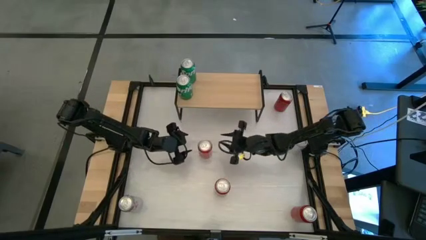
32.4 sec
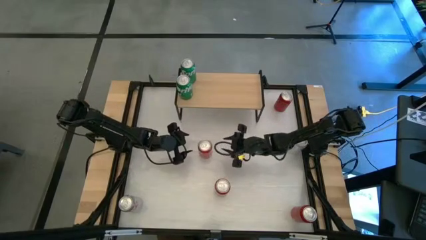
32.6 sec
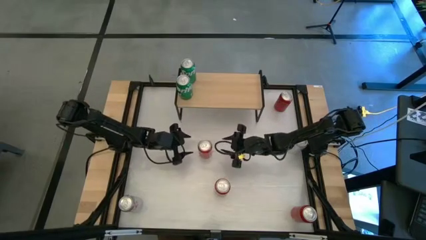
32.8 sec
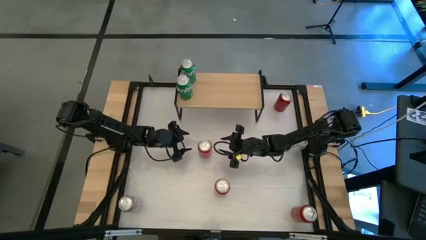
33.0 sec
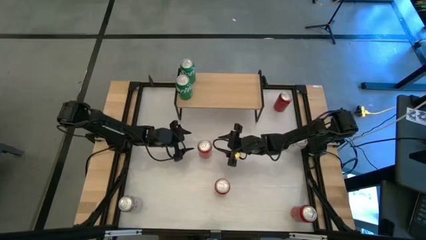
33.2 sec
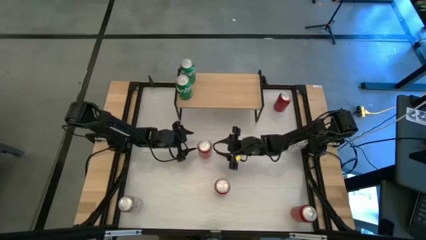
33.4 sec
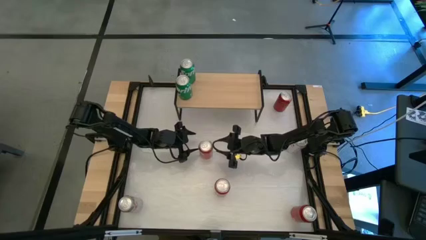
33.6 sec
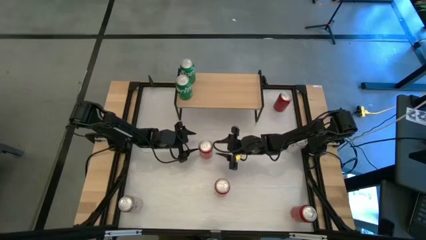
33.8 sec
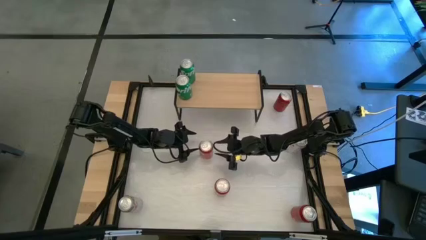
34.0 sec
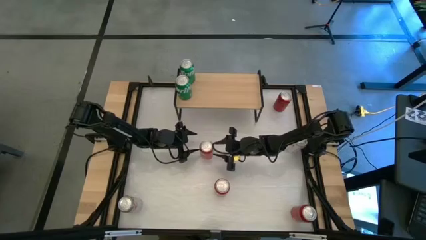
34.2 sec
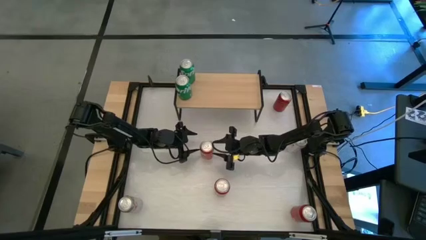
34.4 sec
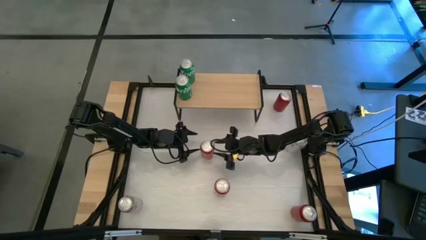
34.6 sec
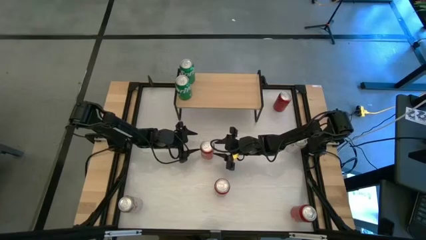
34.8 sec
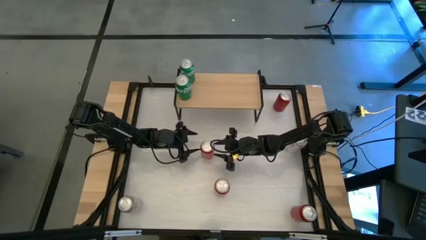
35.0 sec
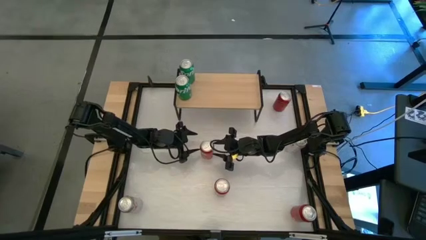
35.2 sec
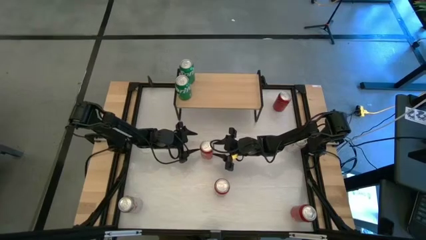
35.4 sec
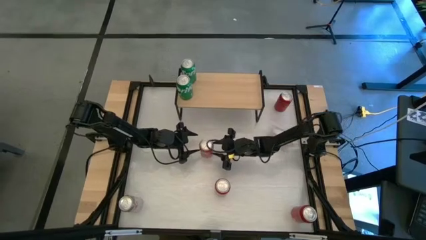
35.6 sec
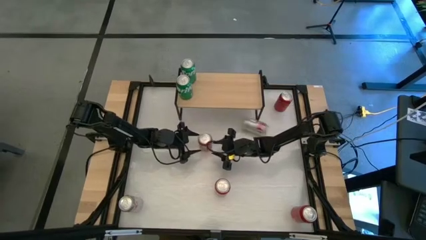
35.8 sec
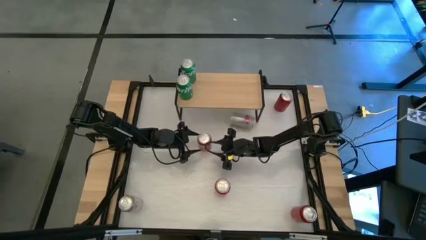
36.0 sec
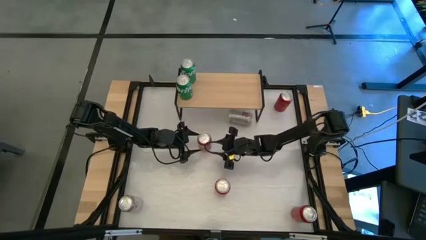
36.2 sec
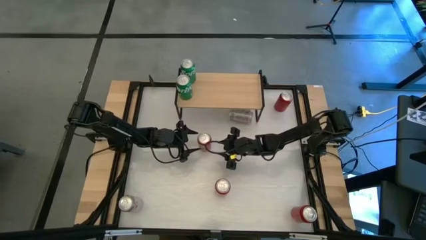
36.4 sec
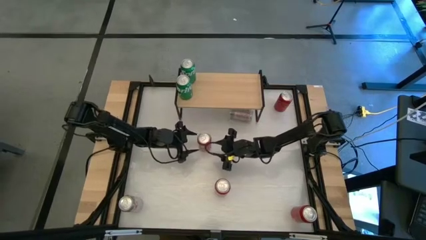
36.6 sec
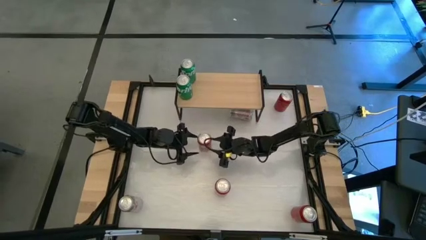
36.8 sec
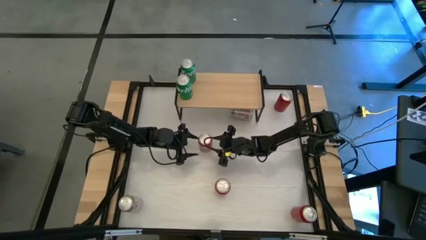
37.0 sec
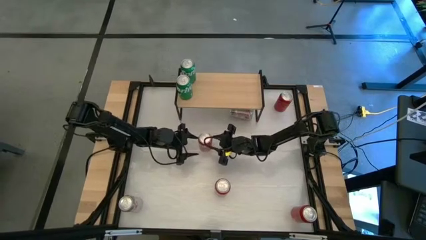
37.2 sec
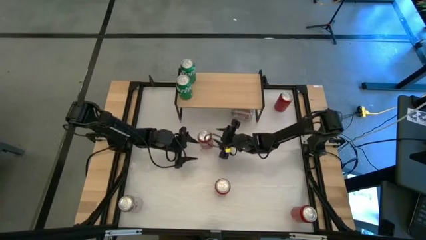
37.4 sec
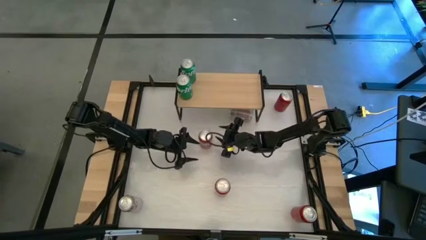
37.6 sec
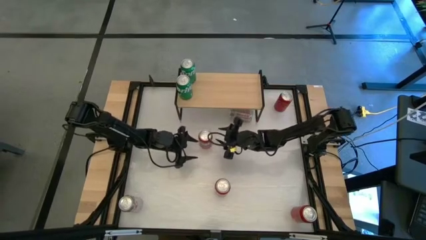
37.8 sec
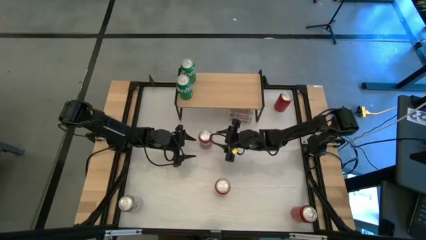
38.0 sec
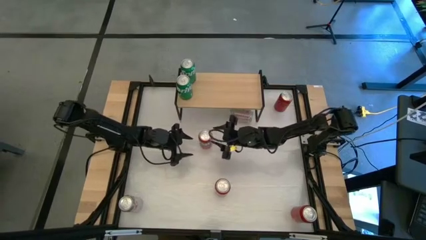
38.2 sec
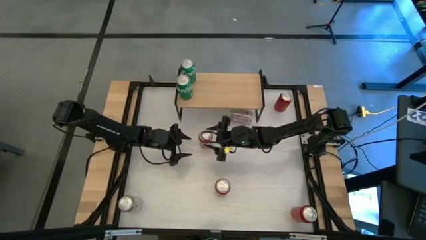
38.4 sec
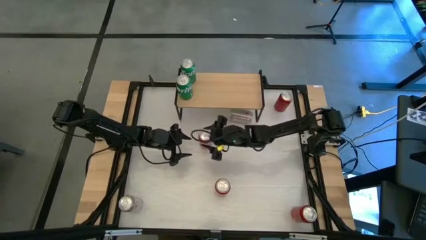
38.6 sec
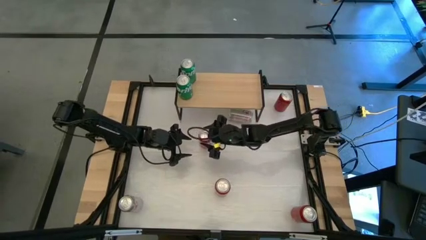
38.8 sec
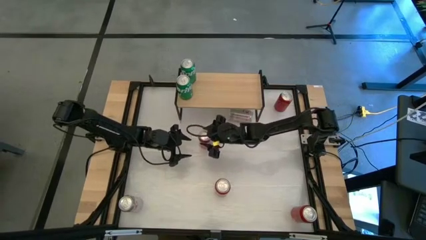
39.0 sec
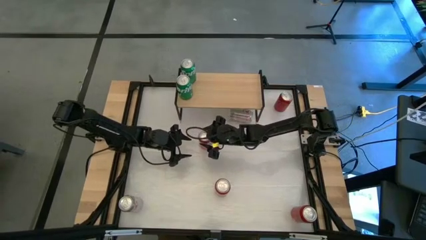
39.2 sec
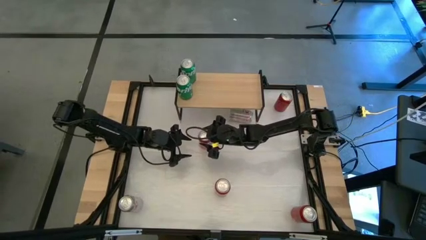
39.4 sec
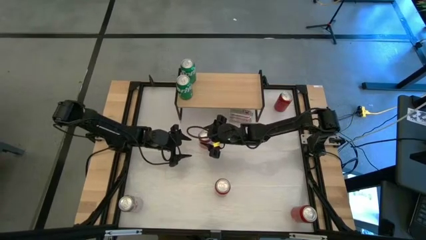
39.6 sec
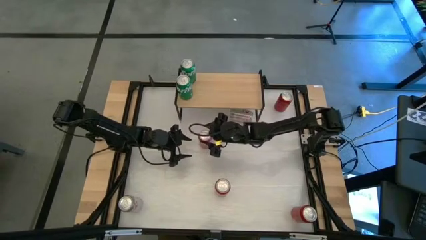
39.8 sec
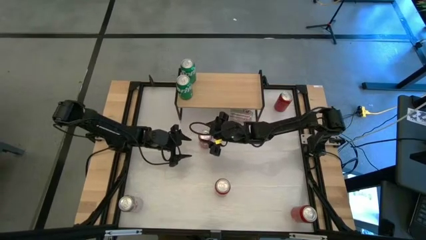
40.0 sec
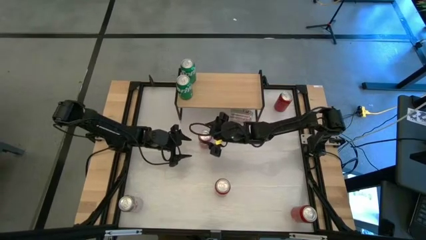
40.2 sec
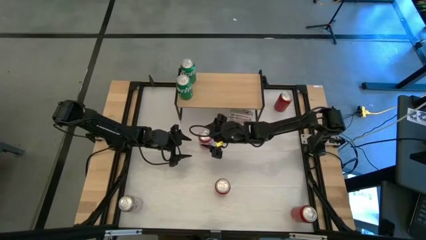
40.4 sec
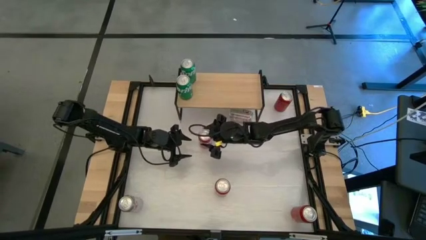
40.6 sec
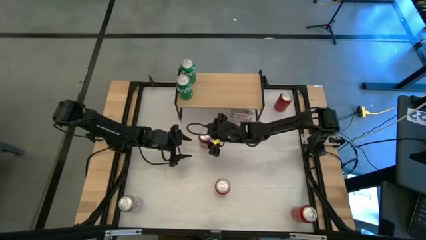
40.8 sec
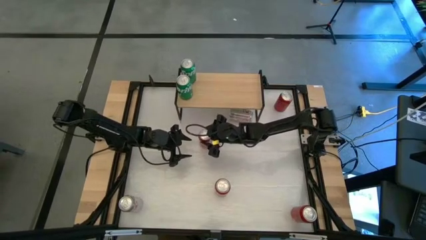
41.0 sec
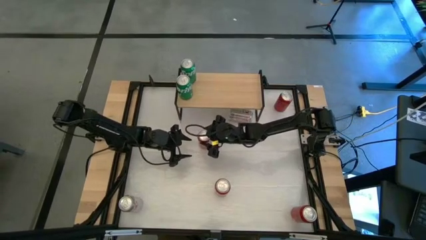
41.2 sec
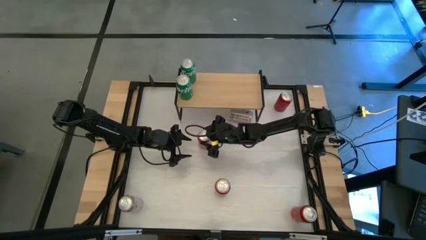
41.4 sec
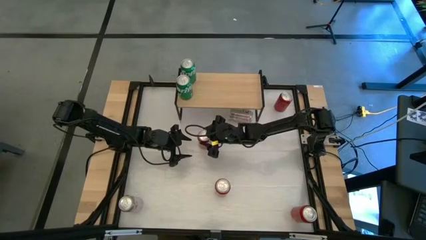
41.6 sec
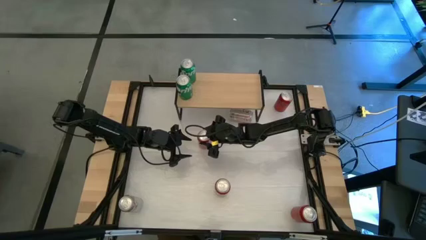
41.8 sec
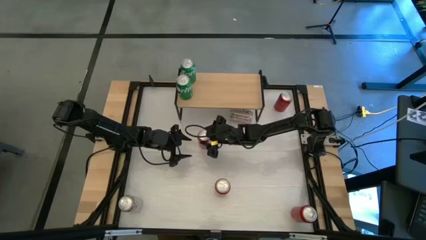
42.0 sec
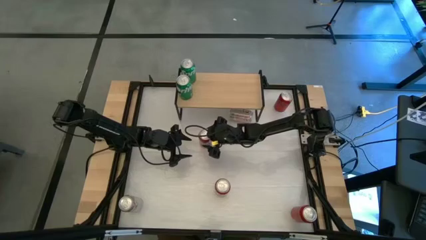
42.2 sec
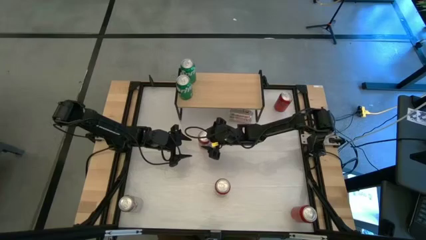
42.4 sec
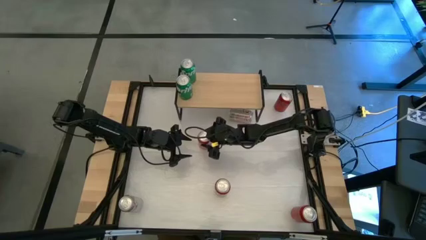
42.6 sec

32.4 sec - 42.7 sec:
Task: Place canned beverage on shelf
Put the top orange soda can on the shelf
